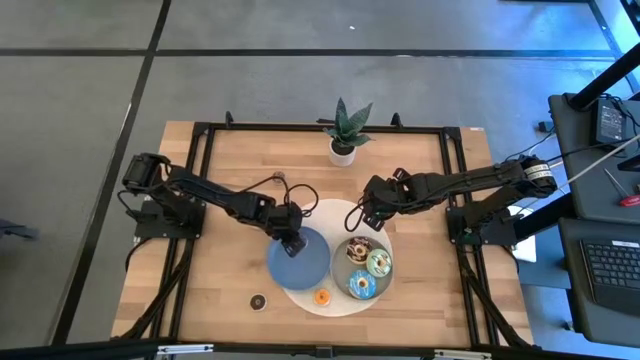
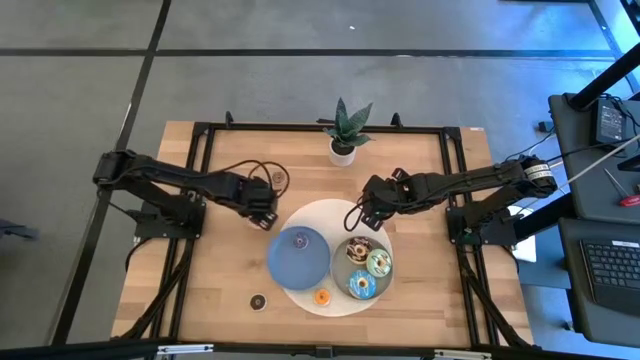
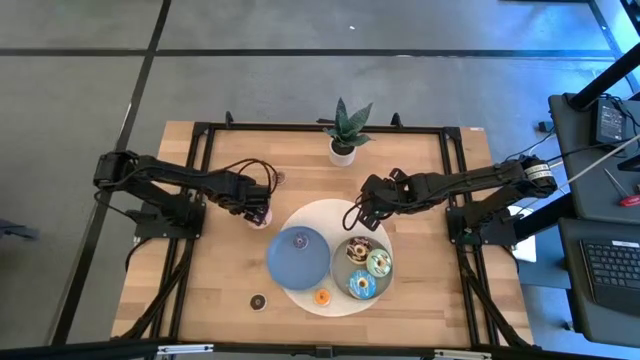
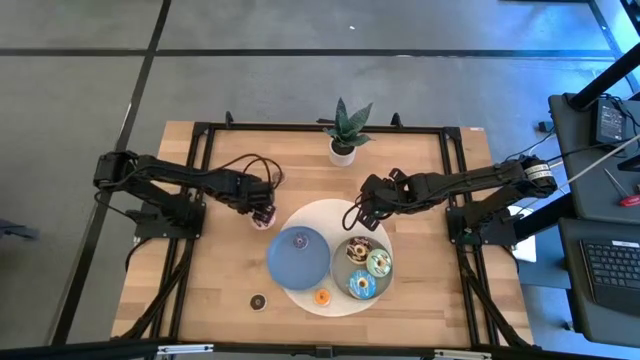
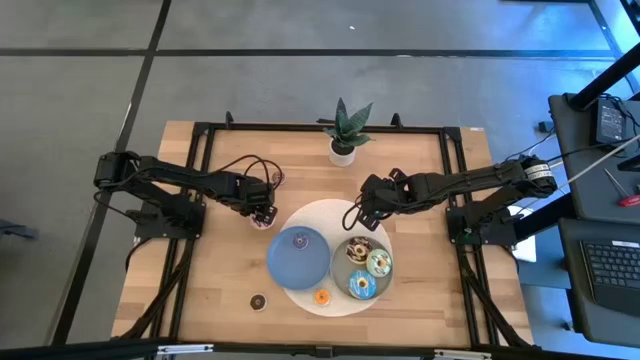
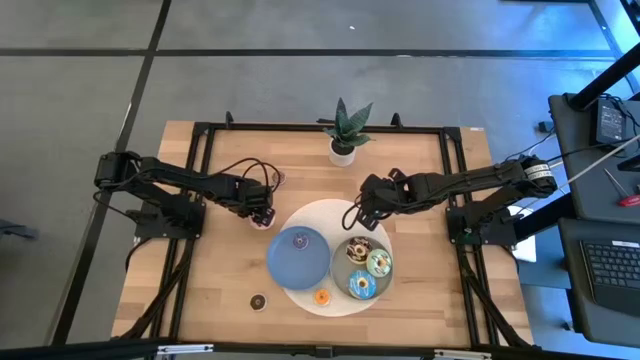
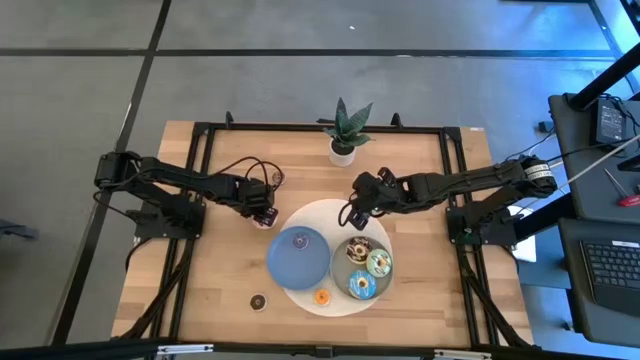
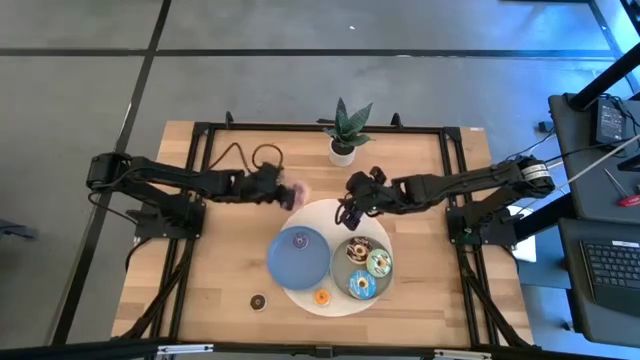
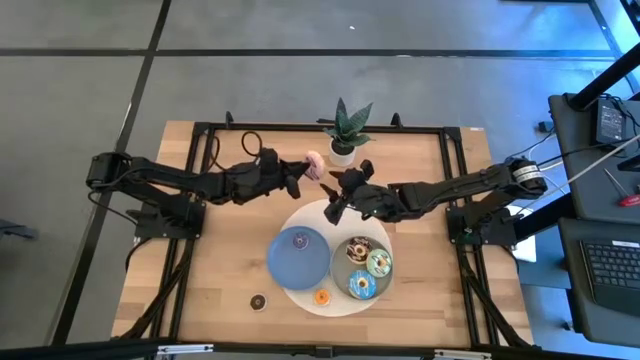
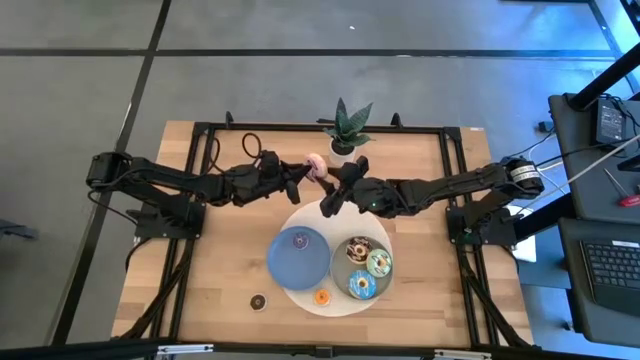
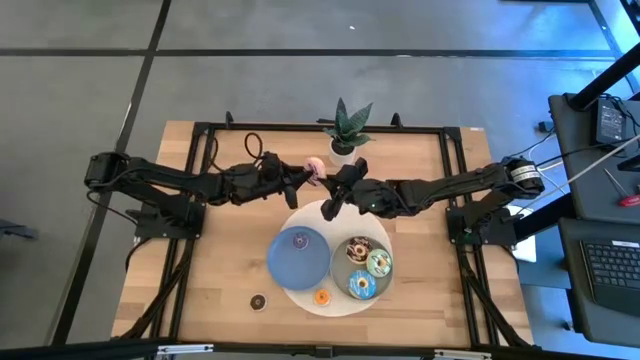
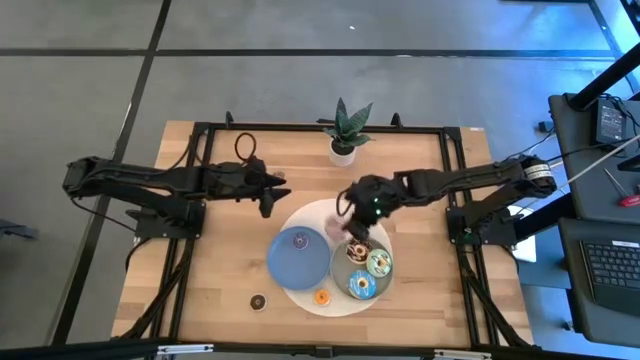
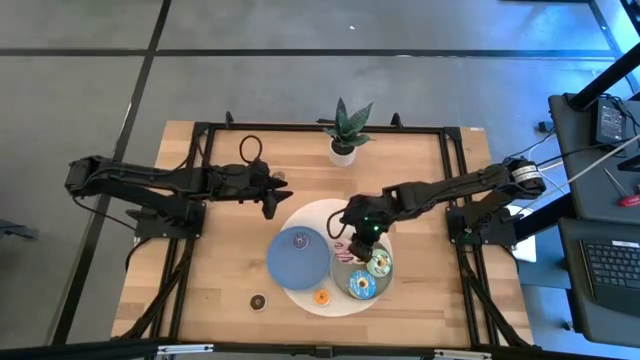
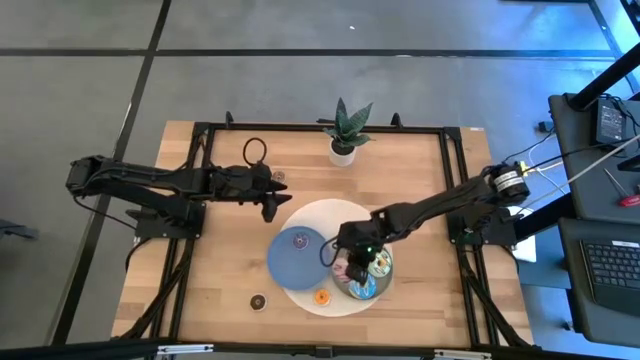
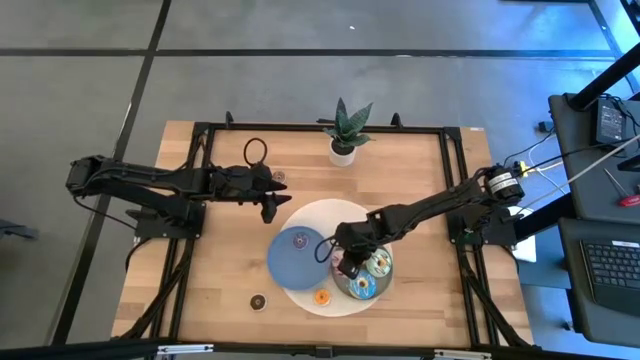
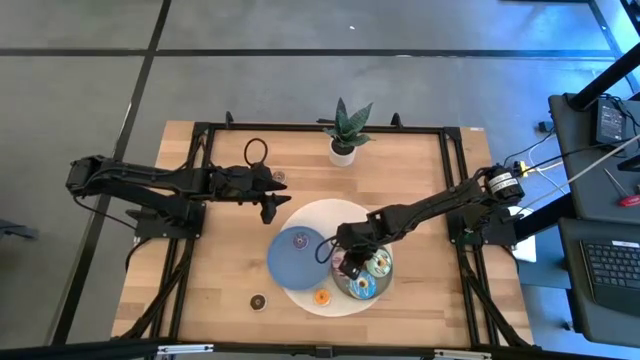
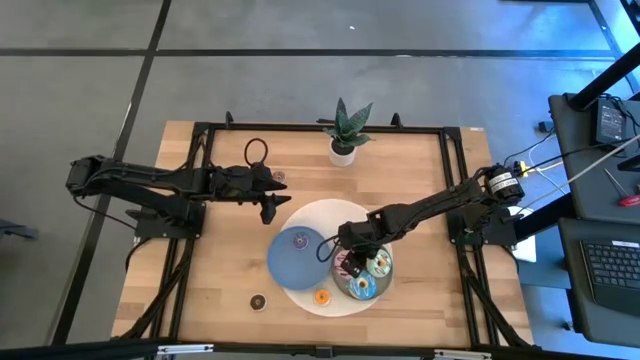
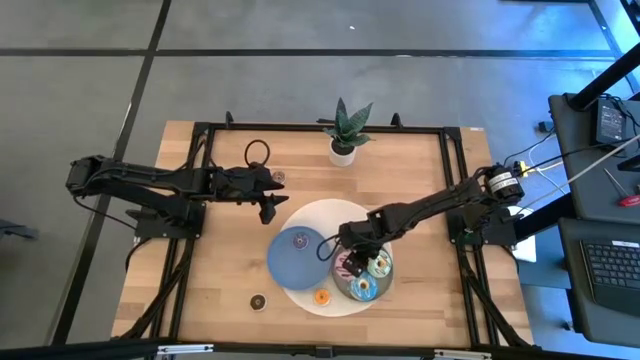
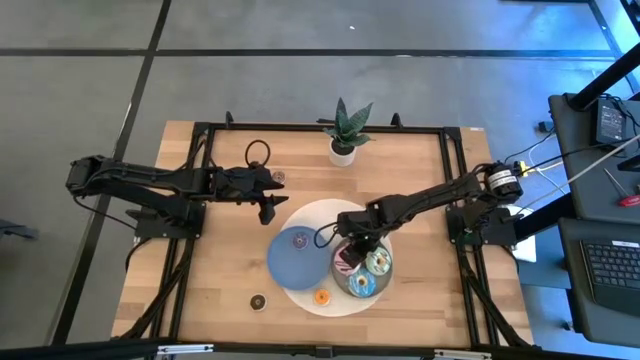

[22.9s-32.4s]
Task: Pick & Place donuts
Put the big purple donut on the gray plate

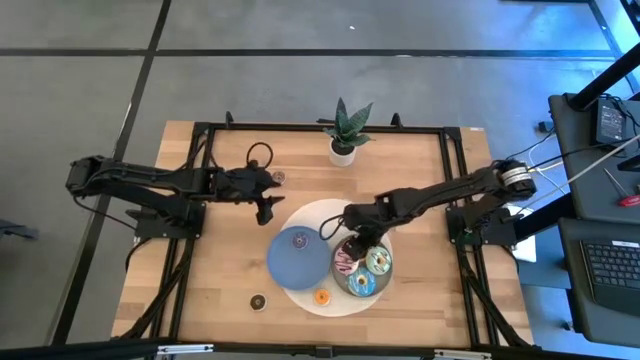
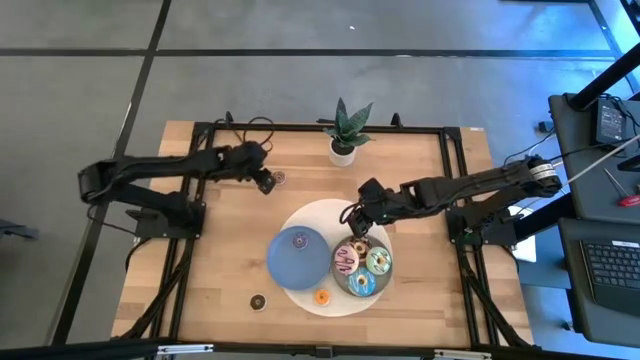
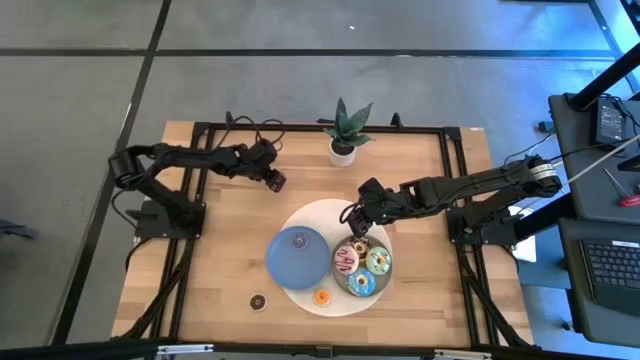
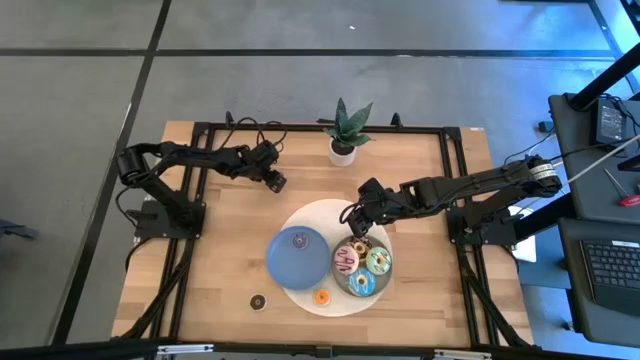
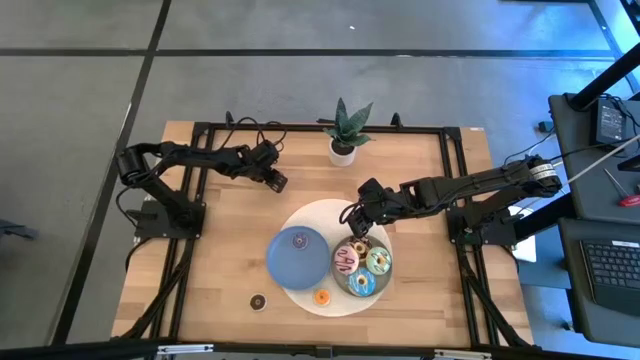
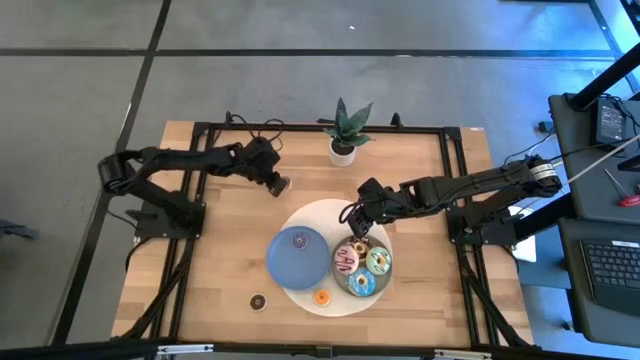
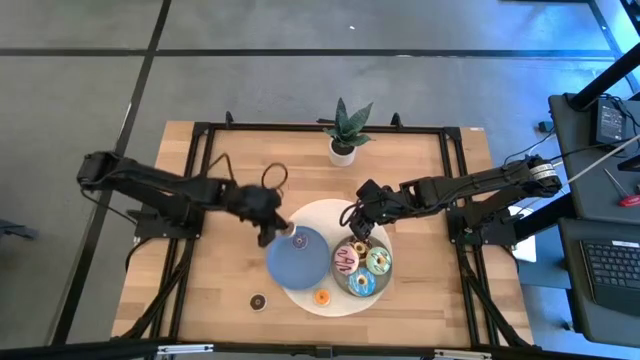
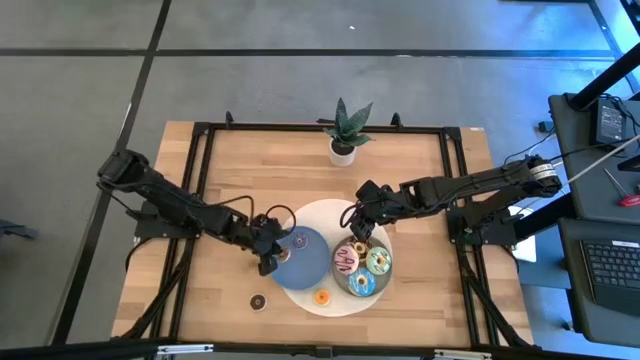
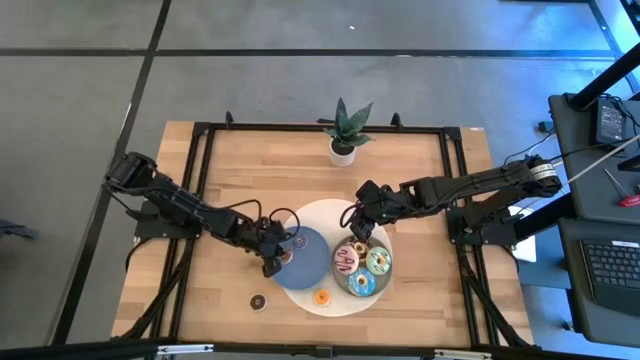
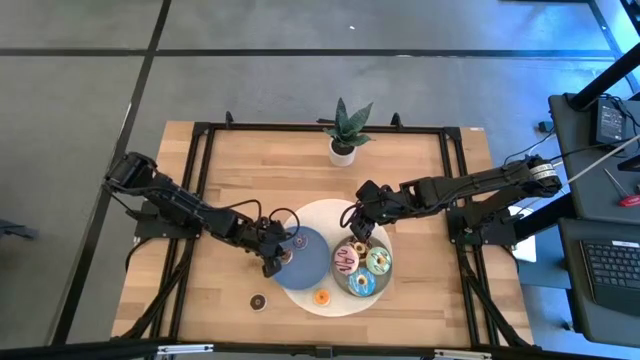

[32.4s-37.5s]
Put the small brown donut on the blue plate

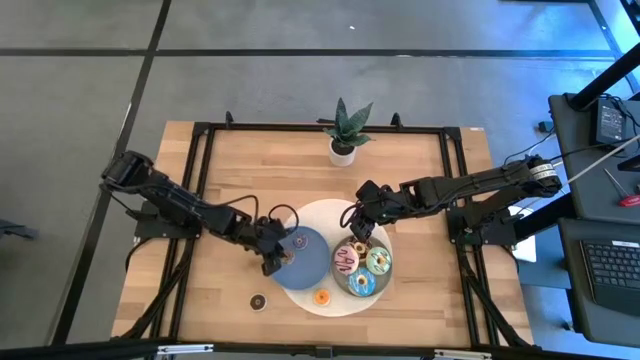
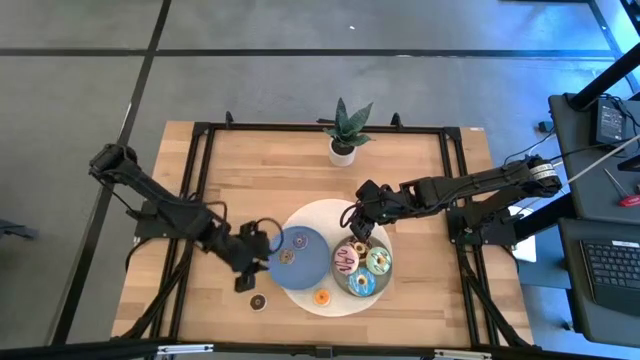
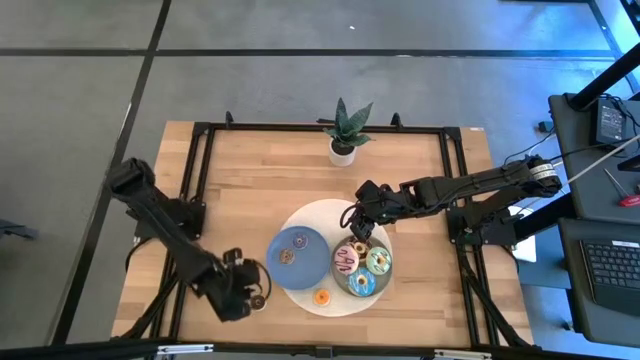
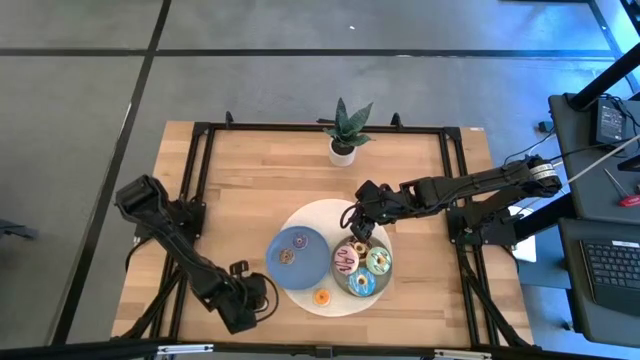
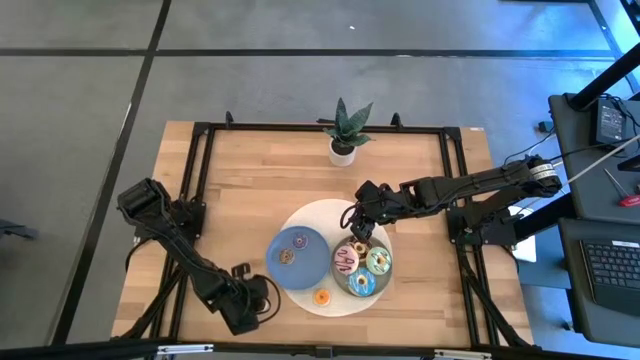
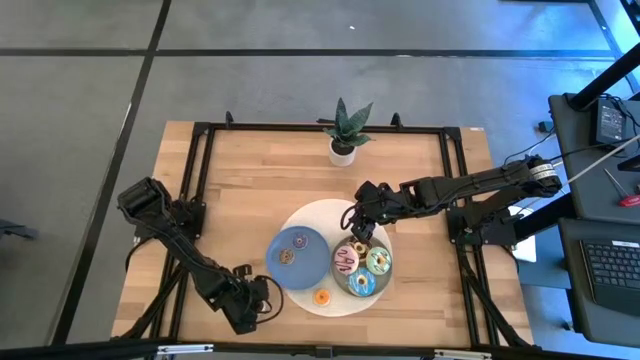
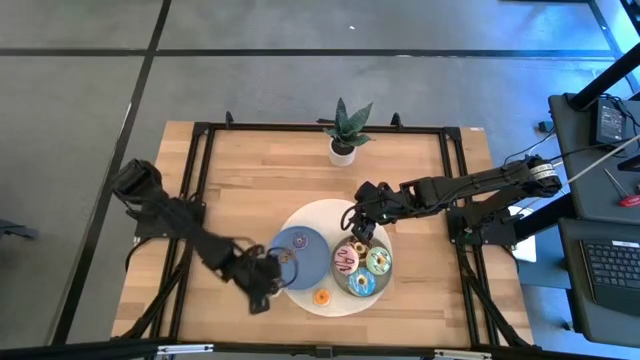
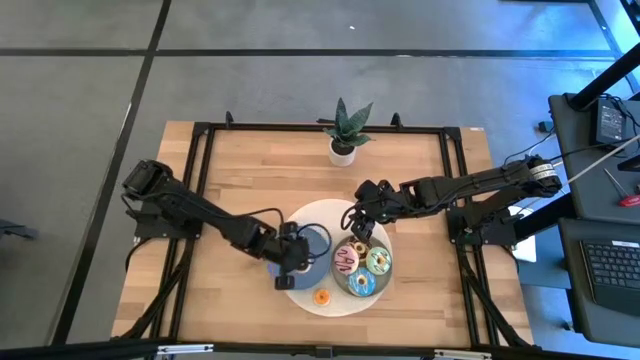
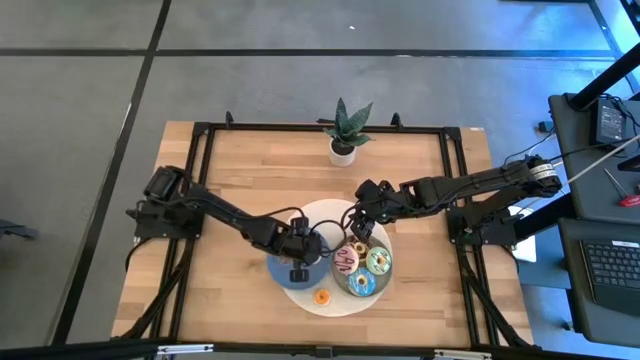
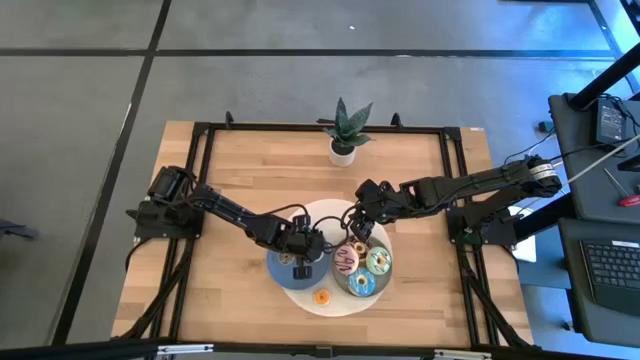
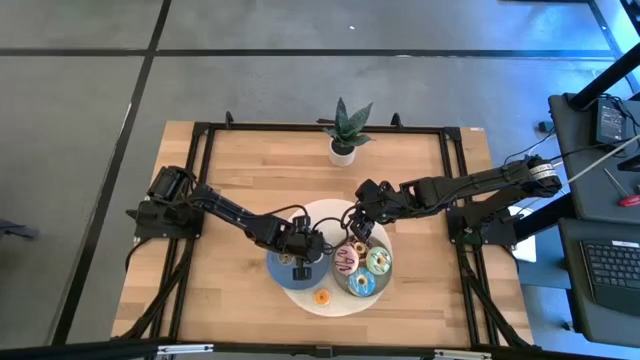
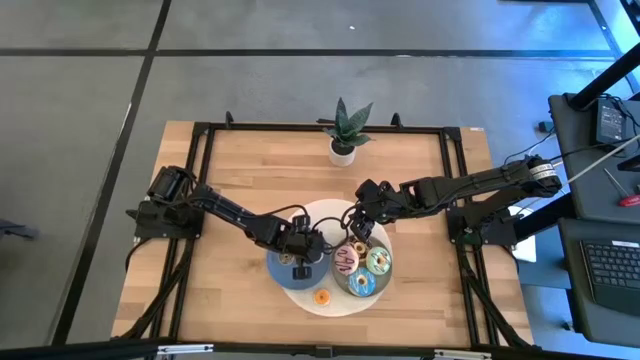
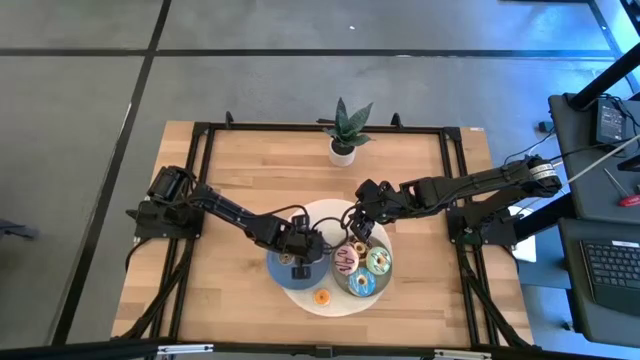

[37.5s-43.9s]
Put the small black donut on the blue plate
